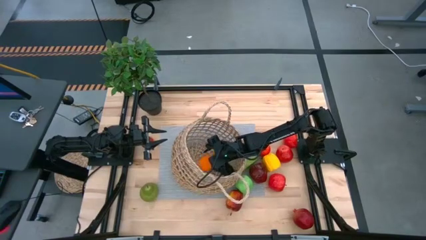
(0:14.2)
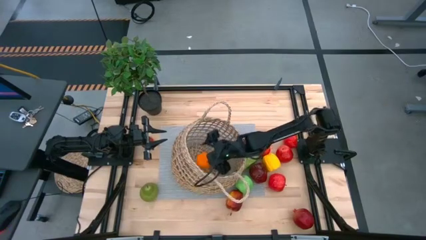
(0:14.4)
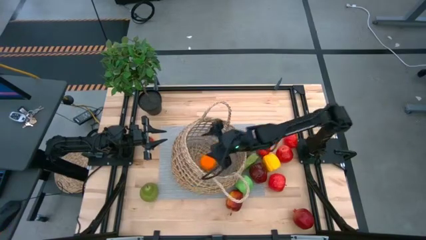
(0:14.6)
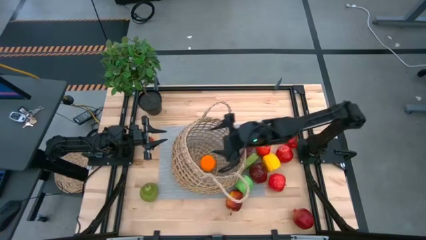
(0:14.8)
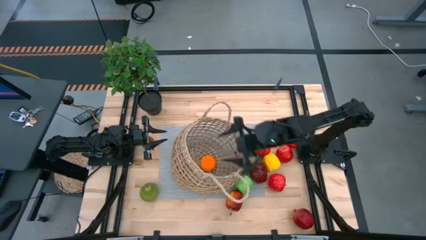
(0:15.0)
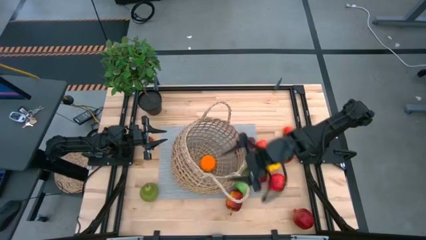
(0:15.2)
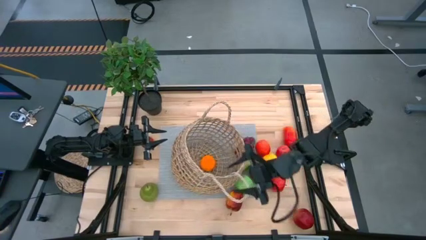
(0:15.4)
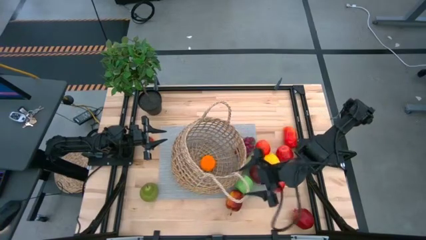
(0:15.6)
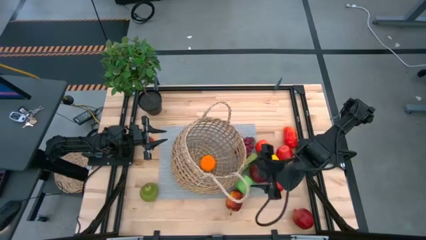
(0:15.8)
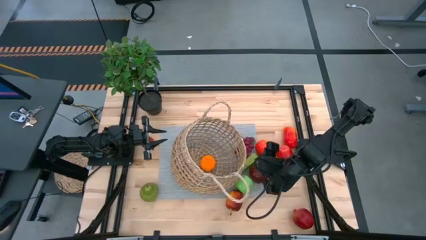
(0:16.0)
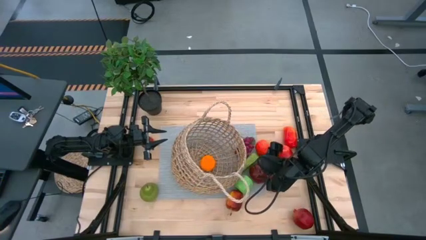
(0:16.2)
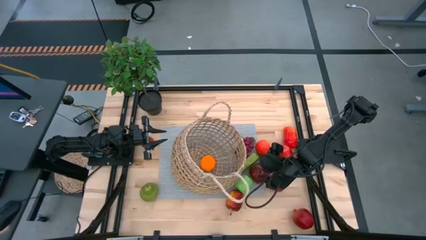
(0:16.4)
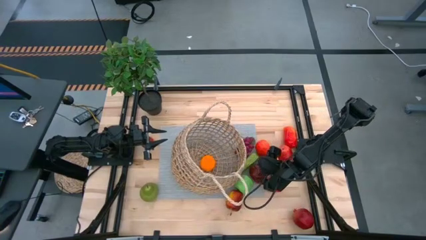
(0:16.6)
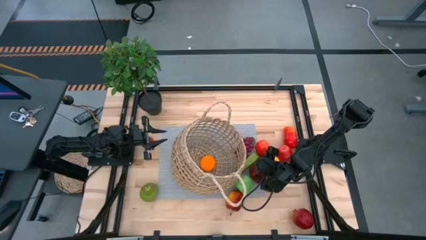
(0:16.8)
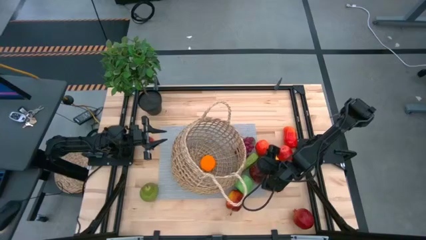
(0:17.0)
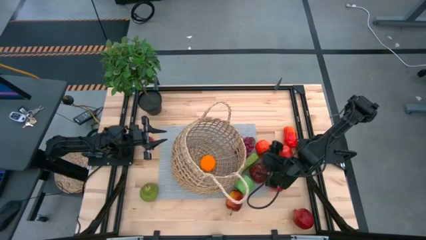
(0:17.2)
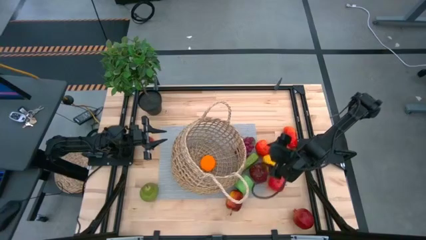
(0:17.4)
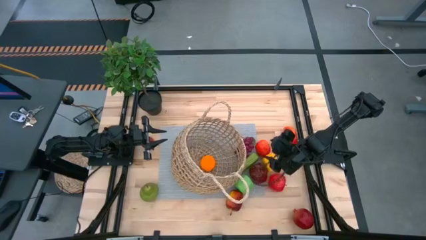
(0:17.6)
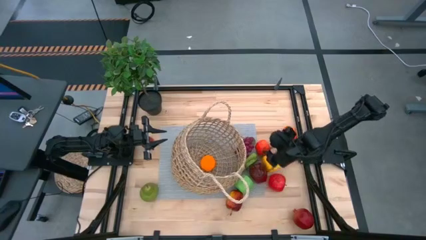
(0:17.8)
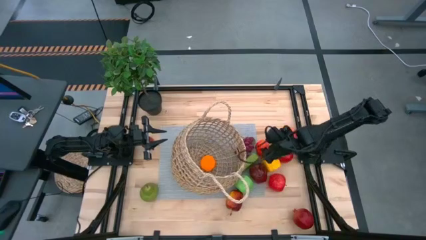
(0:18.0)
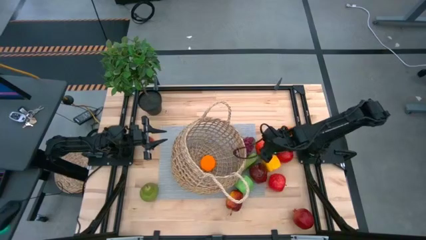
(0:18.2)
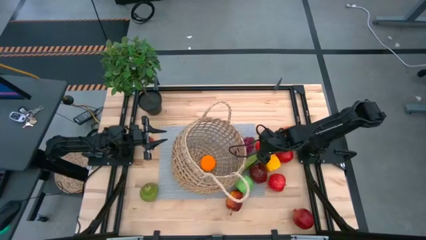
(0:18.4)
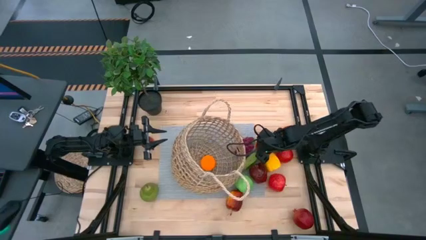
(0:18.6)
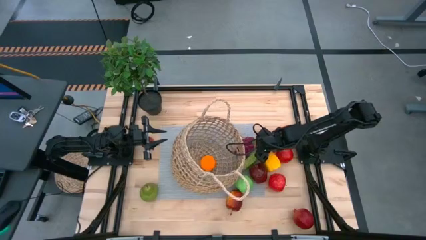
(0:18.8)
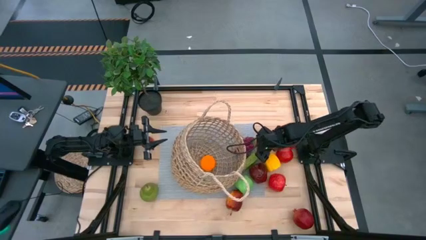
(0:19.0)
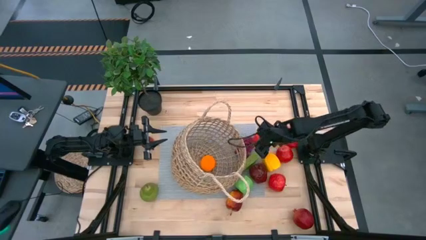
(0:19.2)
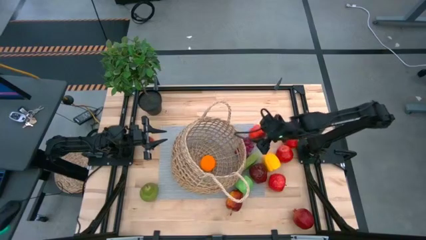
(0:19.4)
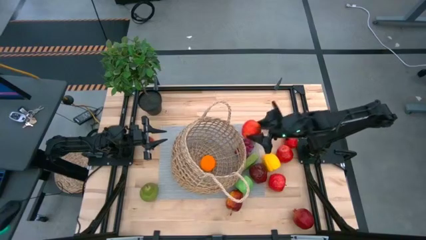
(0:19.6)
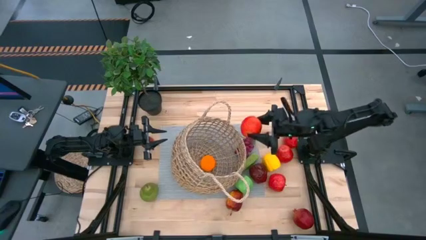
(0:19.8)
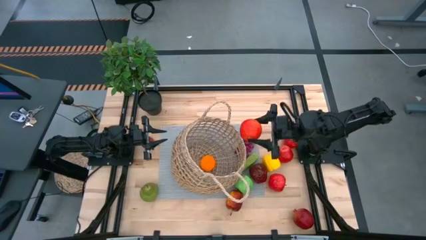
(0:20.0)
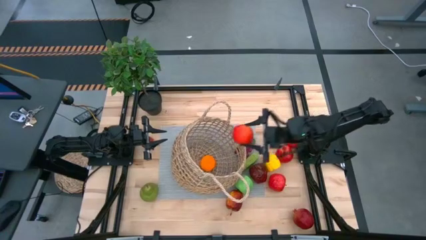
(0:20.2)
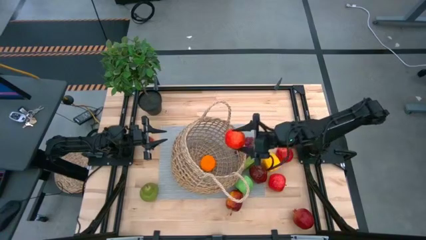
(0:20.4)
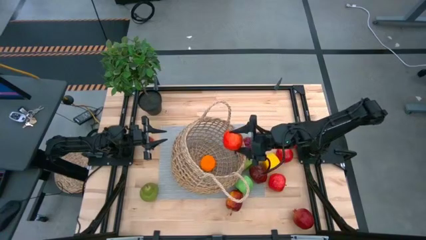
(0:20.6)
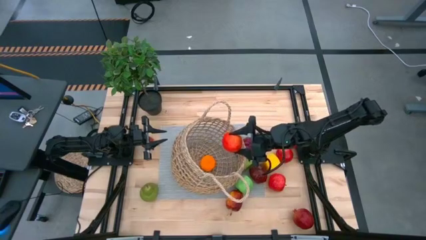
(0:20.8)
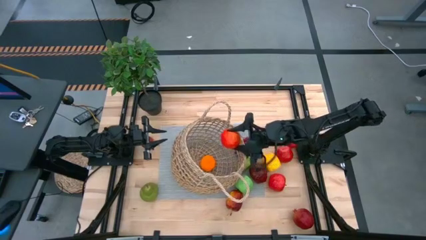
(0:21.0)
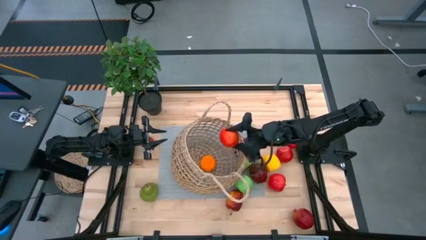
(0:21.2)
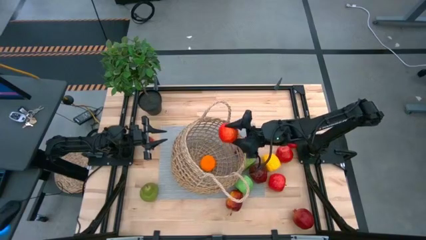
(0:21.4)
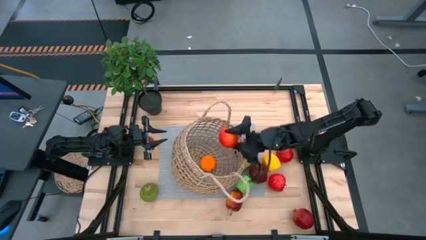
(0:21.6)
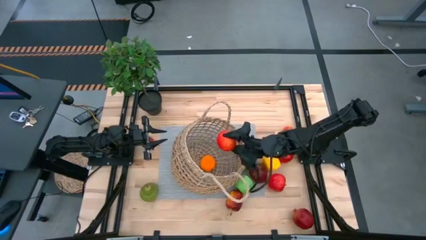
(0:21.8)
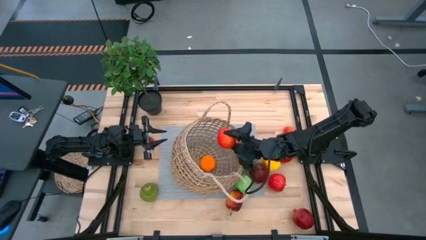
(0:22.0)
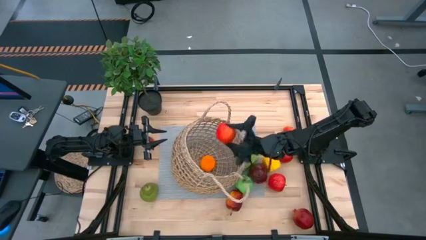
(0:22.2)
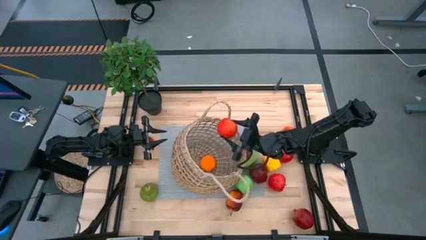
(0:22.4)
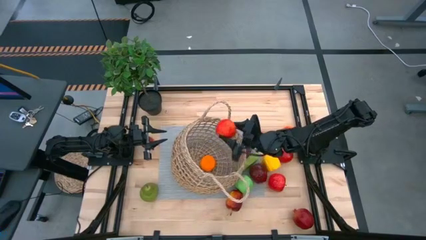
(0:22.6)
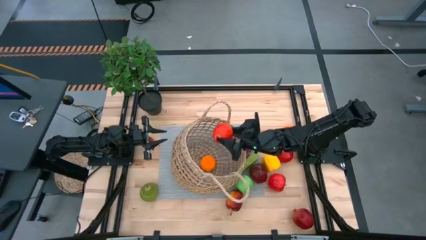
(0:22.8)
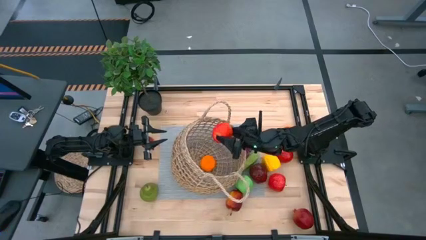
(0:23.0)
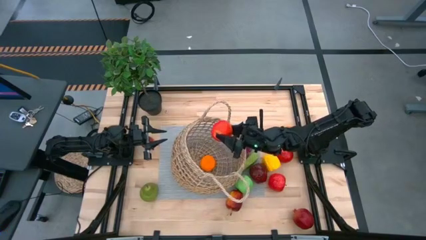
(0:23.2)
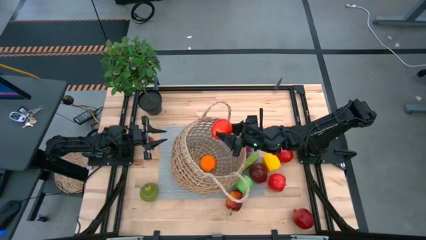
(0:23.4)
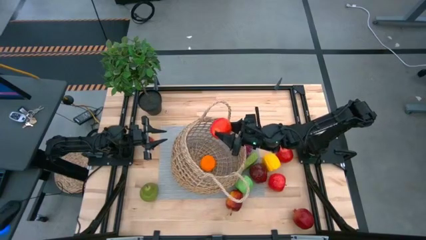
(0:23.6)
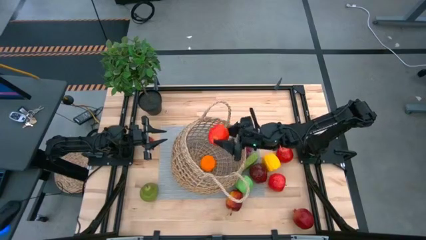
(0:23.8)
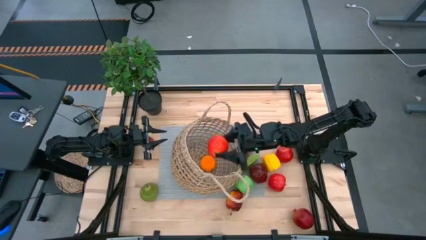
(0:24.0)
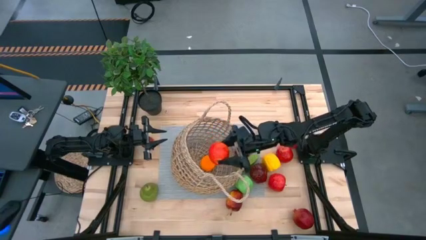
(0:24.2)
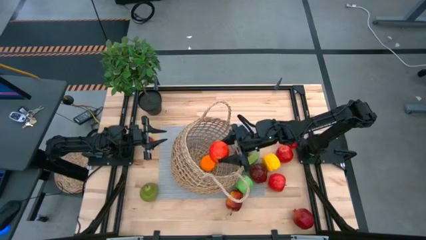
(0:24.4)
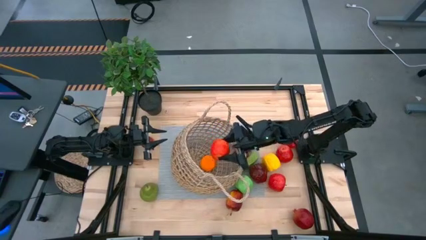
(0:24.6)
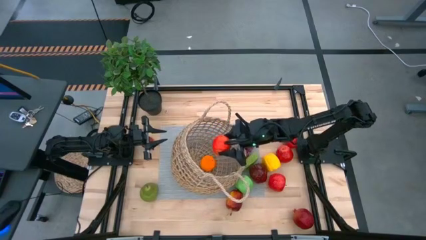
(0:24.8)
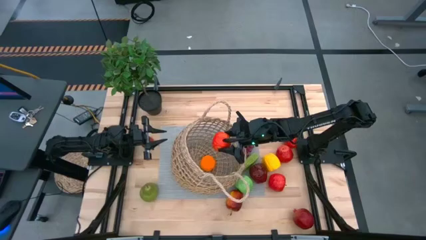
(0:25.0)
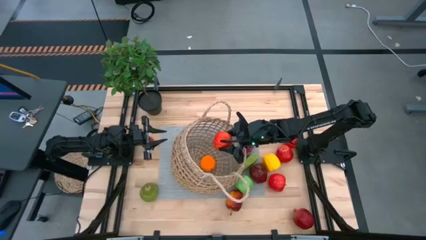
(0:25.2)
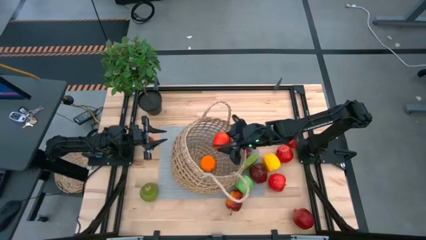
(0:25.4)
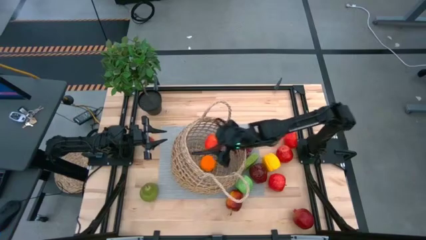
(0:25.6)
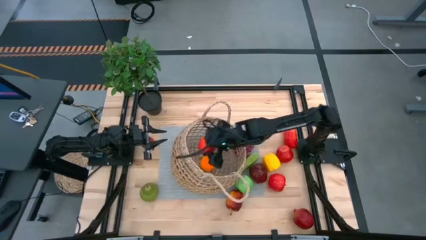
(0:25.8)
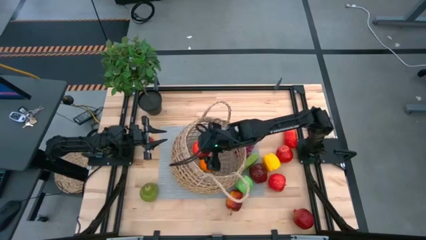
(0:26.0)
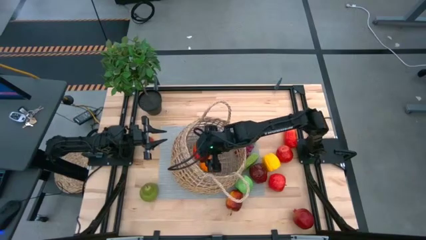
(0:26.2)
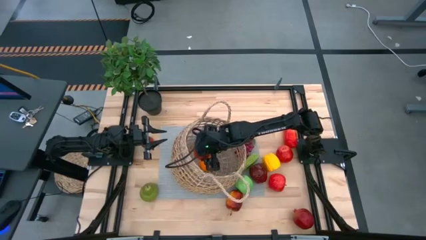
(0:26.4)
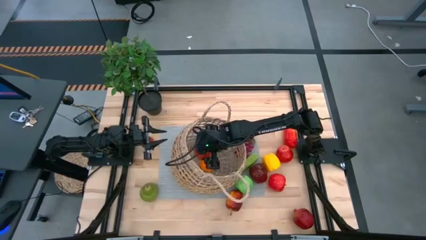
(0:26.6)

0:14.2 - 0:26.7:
Task: Build produce basket
Put the red apple into the brown basket
